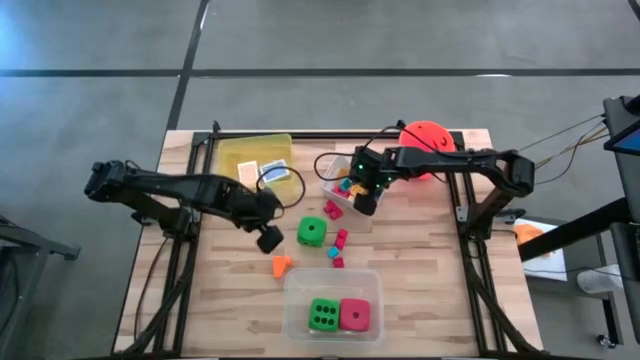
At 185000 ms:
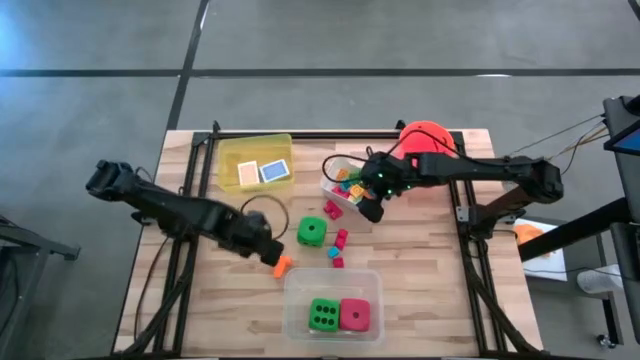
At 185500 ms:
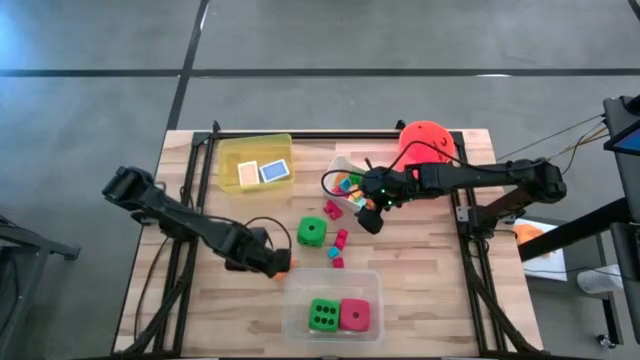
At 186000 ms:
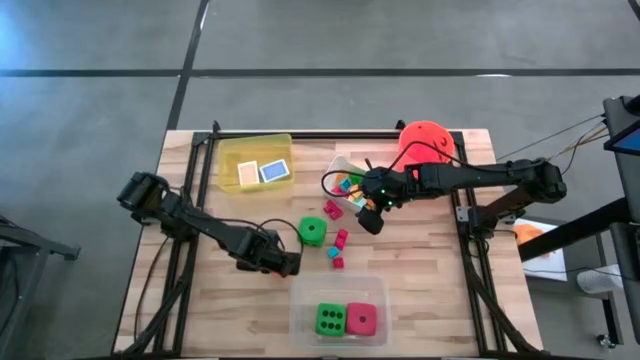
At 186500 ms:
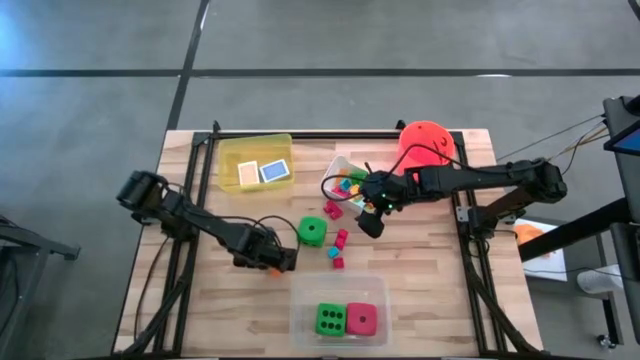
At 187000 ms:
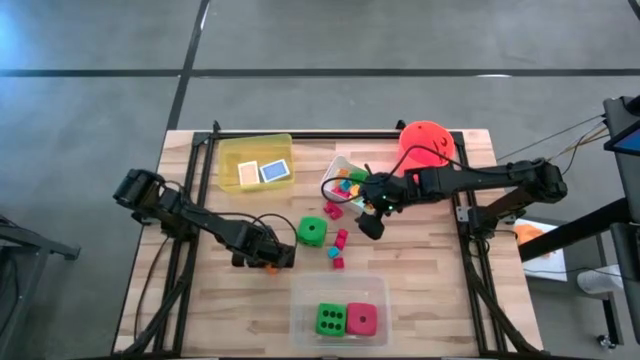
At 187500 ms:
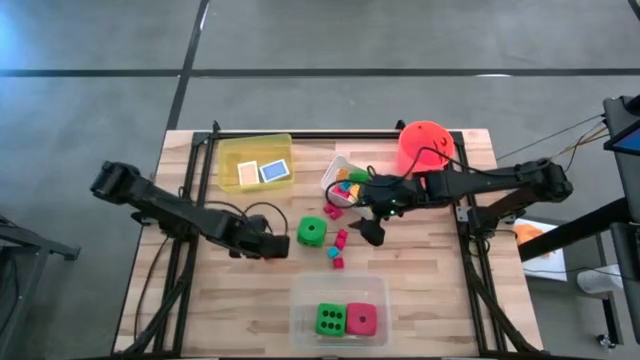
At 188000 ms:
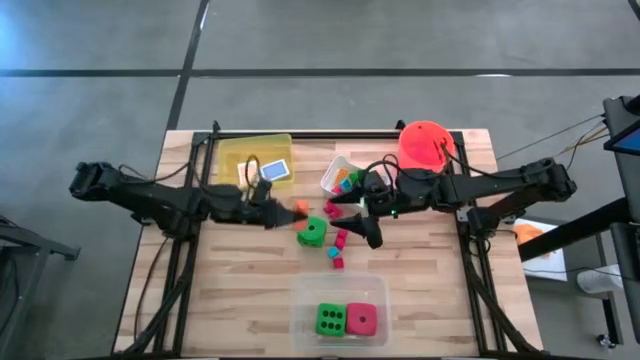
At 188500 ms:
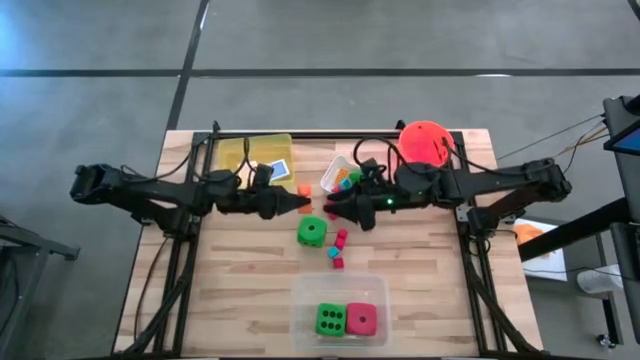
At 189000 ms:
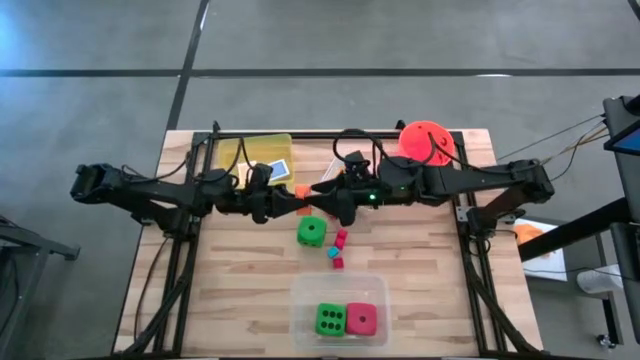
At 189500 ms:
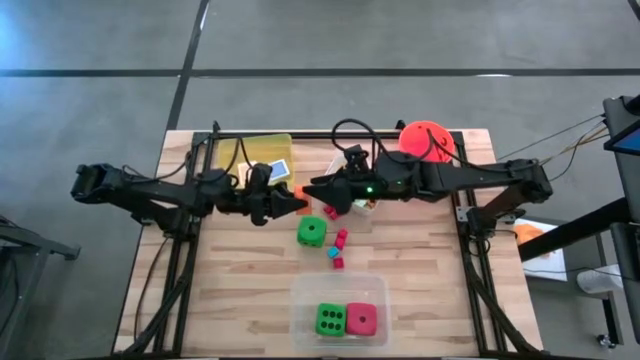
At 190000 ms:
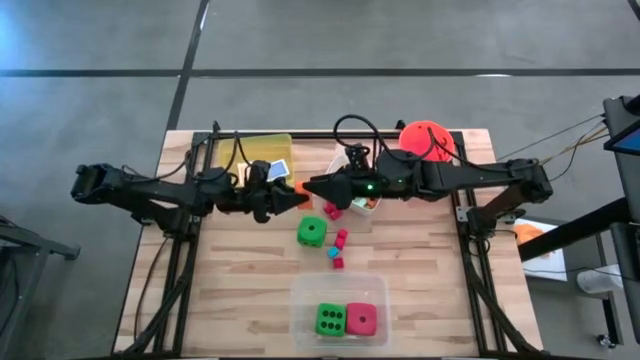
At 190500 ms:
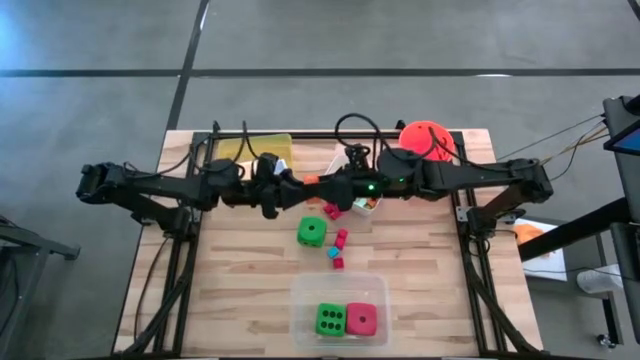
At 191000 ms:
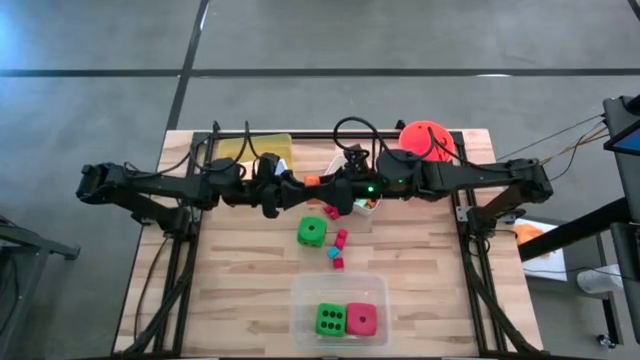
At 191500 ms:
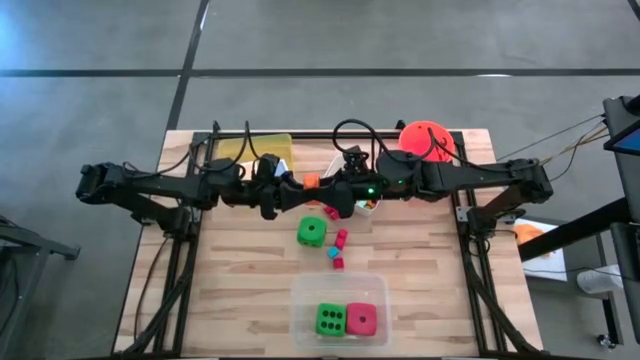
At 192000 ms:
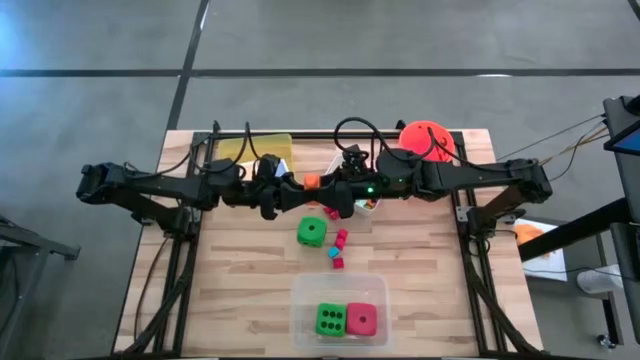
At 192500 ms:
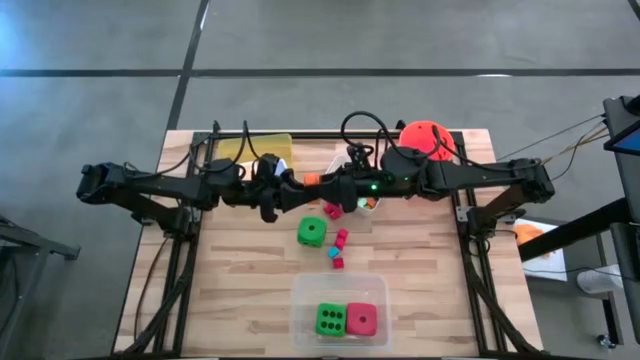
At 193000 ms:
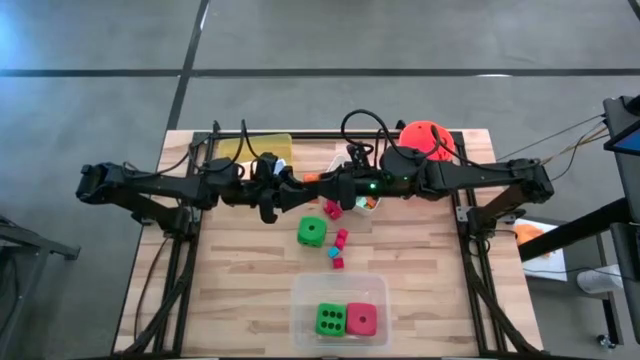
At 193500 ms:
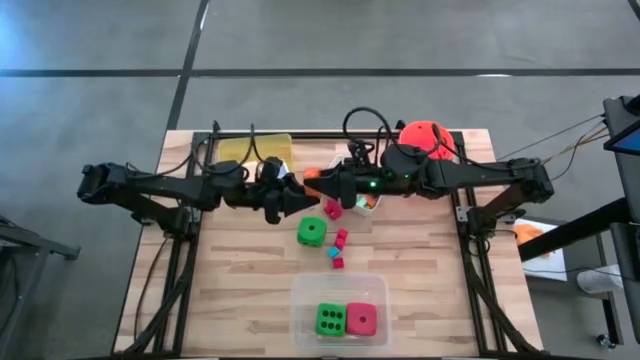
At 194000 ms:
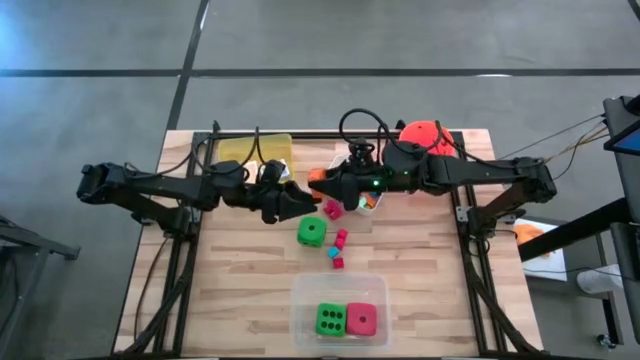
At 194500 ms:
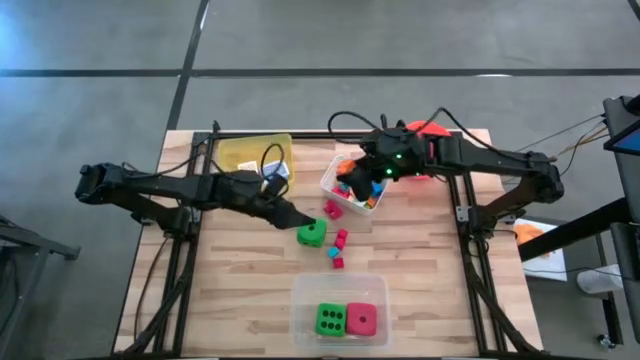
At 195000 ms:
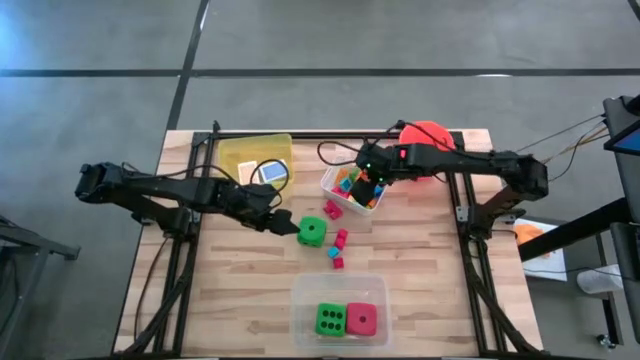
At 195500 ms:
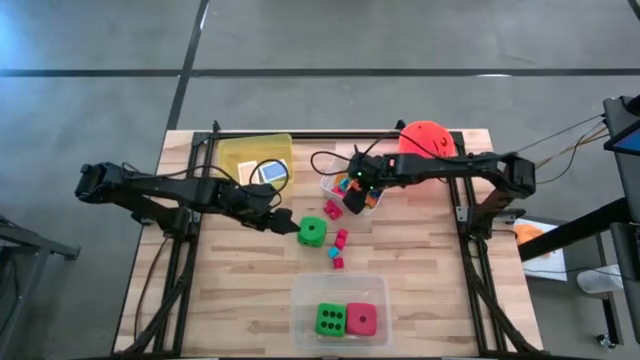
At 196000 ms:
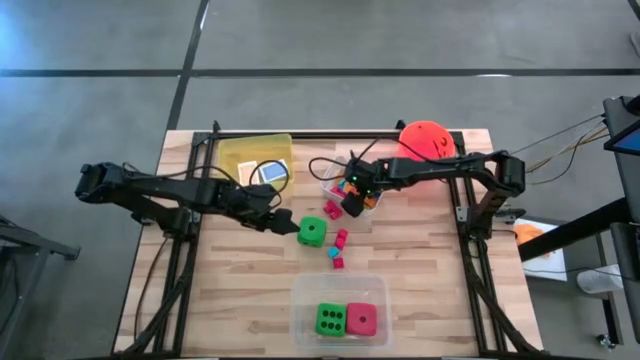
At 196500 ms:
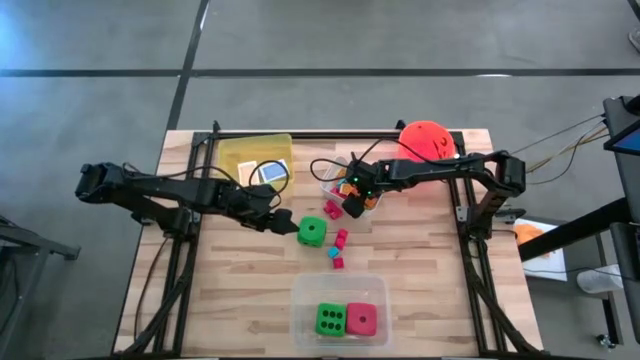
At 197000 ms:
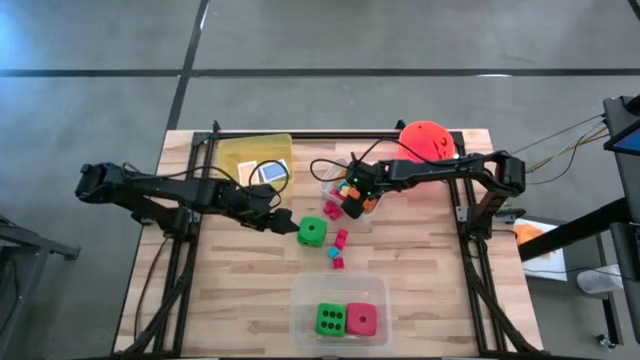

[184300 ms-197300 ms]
Task: Pick & Place Toys
Put the orange game piece into the white bin

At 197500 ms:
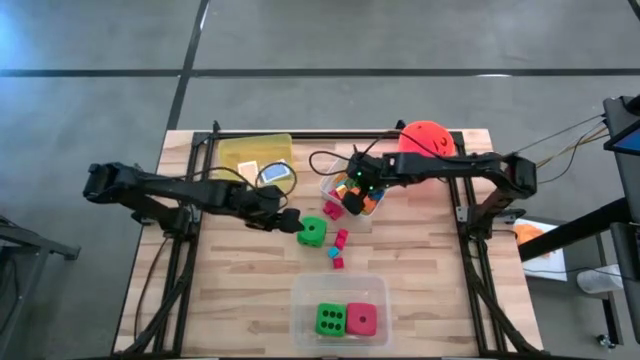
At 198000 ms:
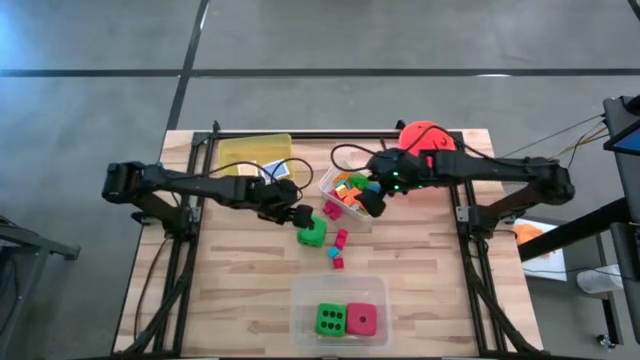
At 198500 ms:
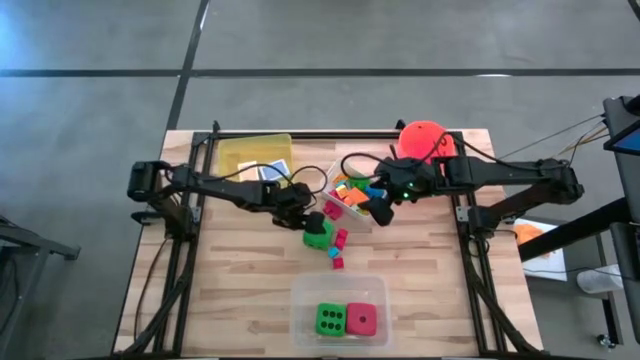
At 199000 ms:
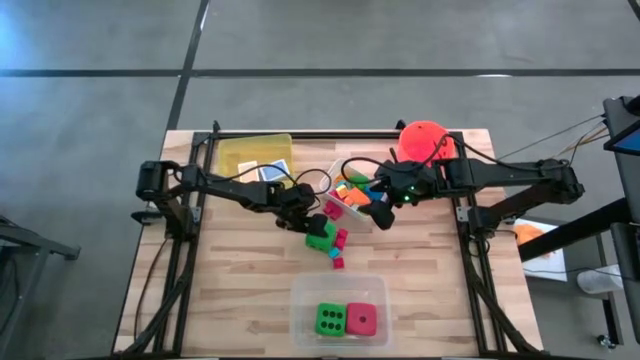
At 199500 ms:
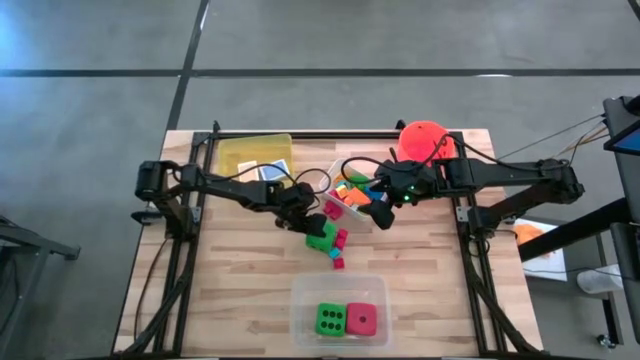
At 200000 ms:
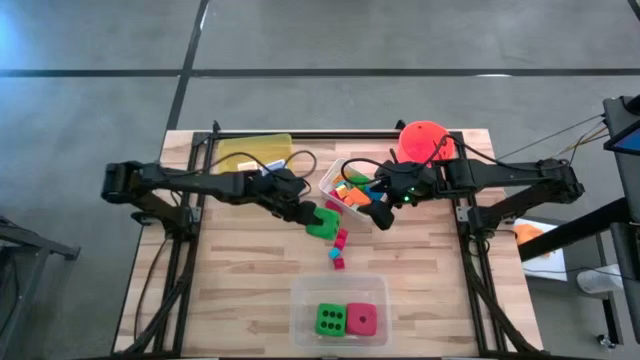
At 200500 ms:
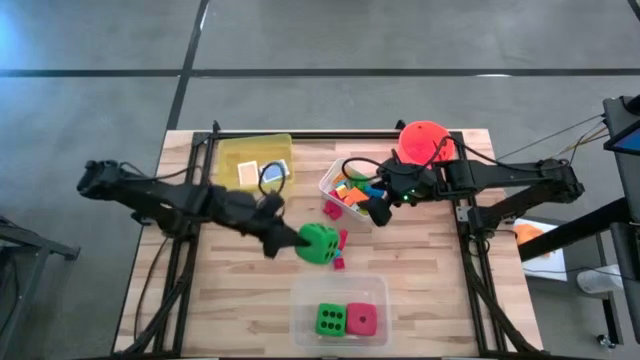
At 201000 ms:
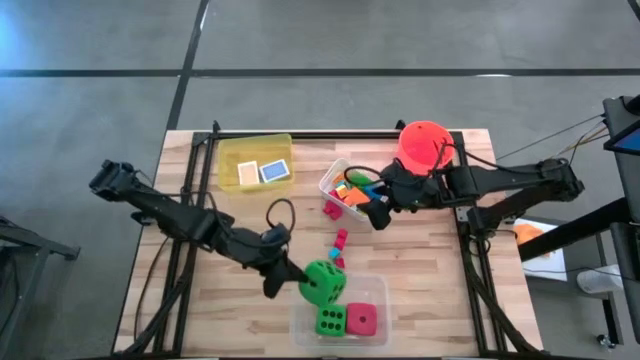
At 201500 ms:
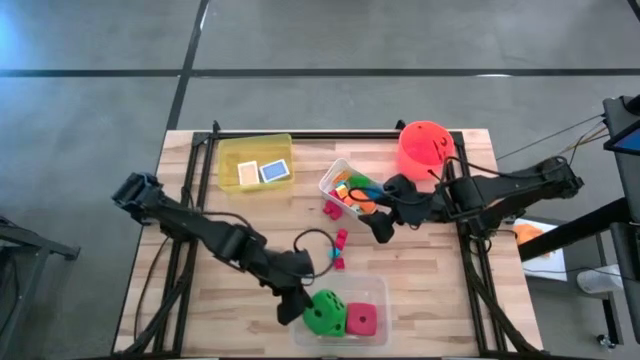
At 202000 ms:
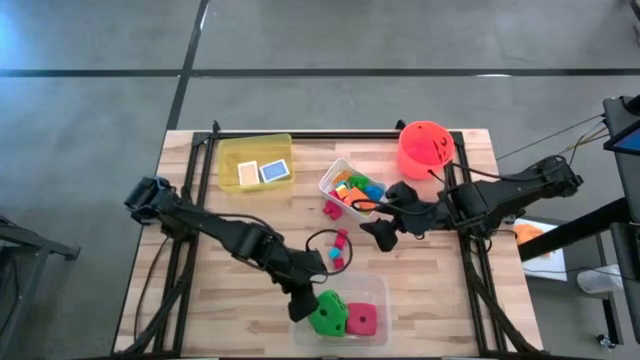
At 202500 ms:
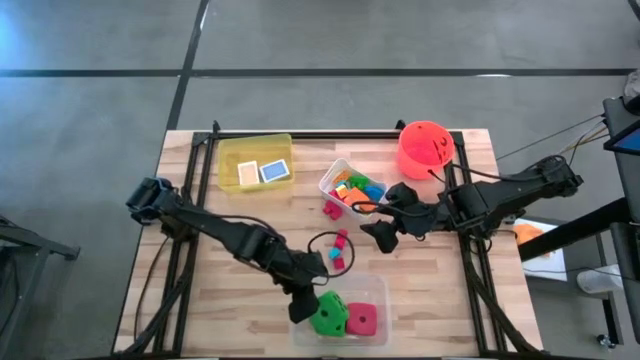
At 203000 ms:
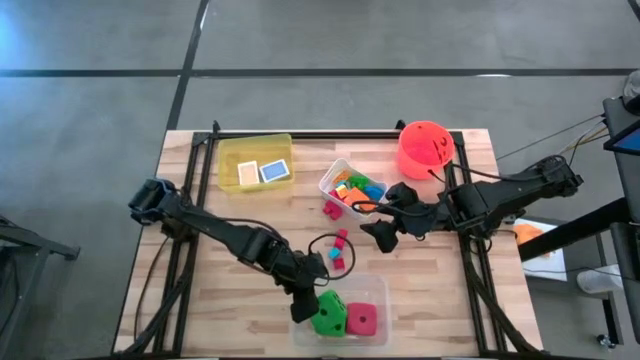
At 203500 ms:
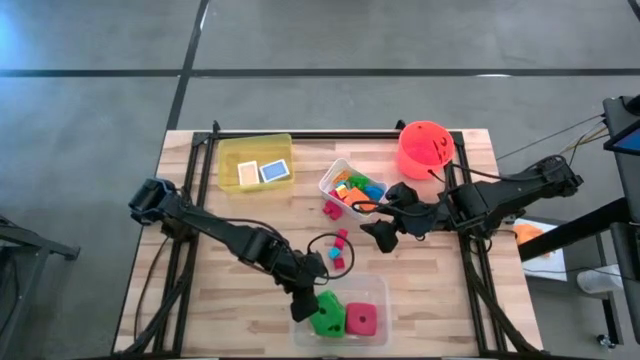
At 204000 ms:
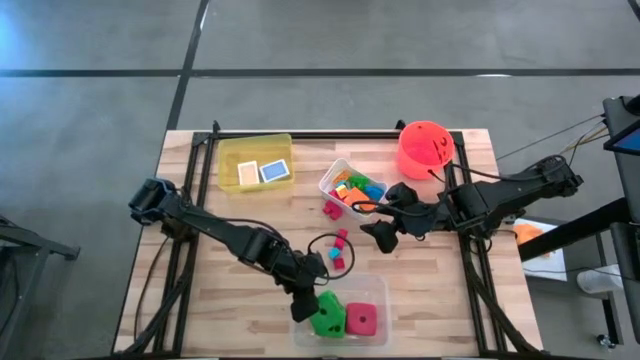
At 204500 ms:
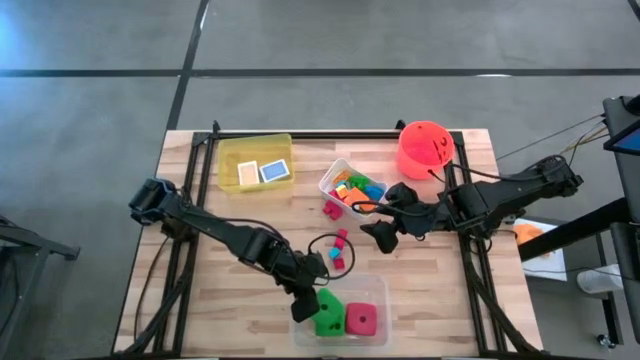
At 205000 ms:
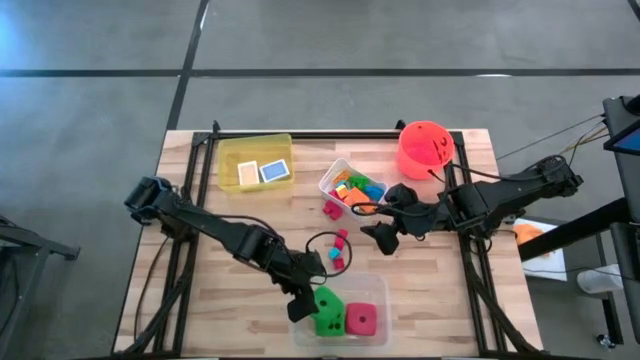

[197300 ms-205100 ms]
Put the green dice into the transparent bin
